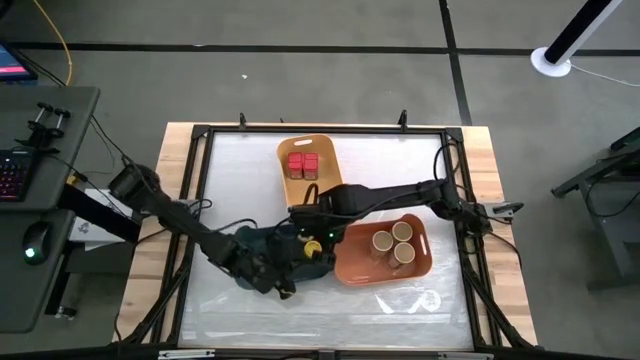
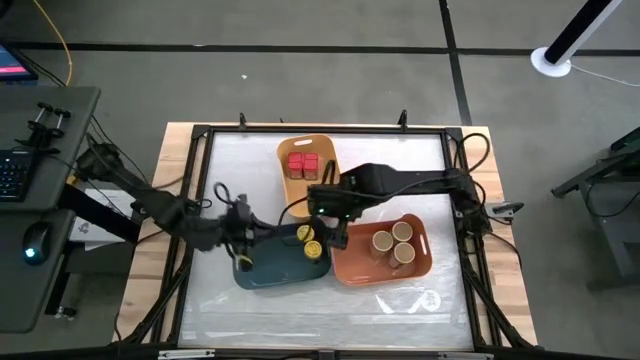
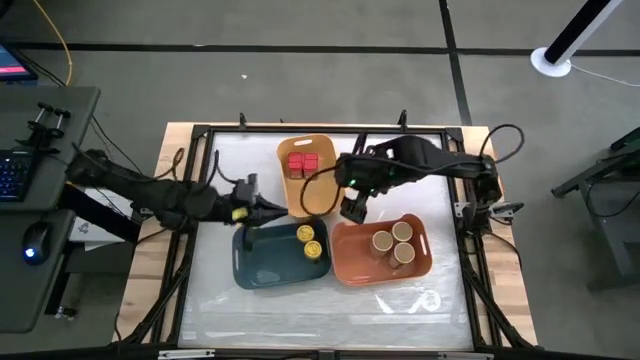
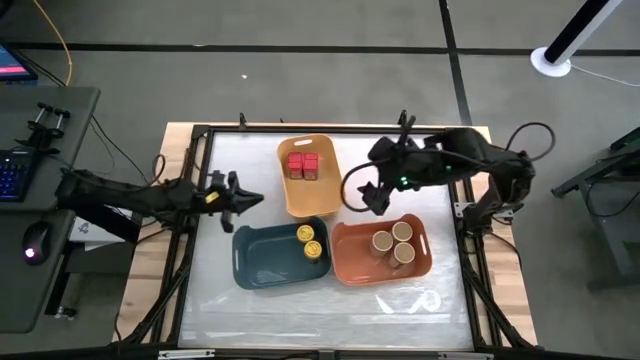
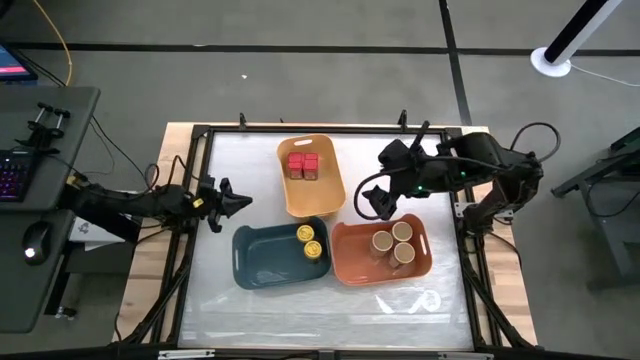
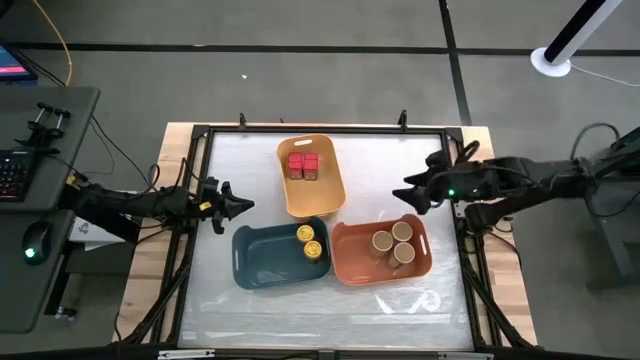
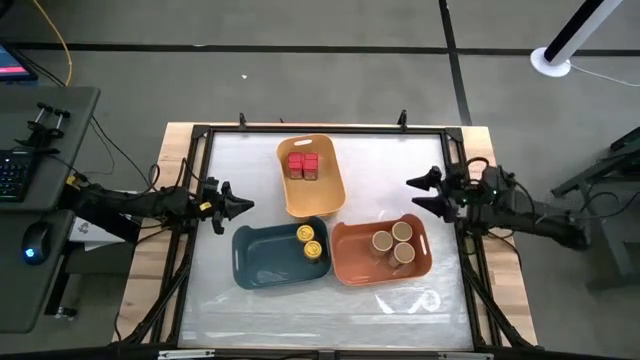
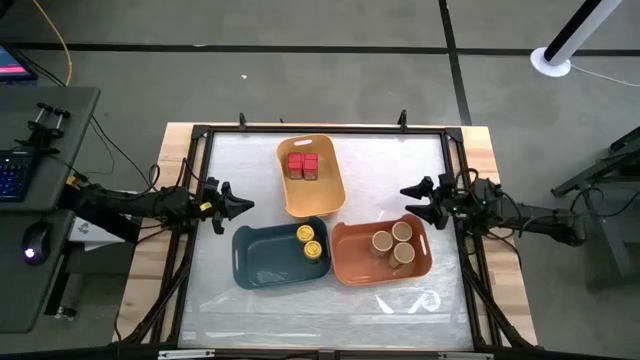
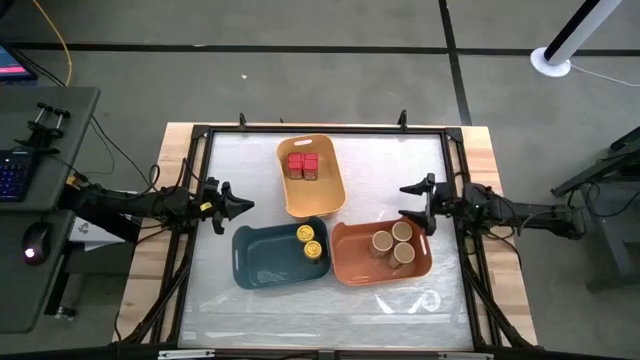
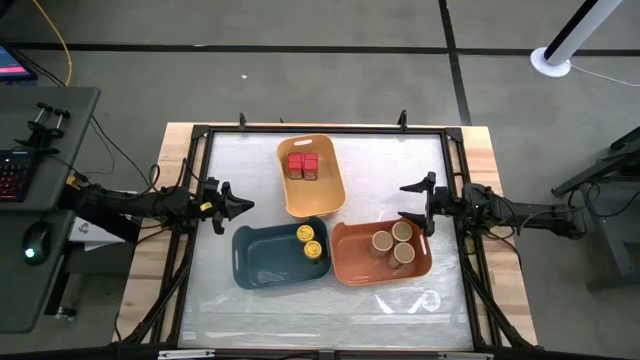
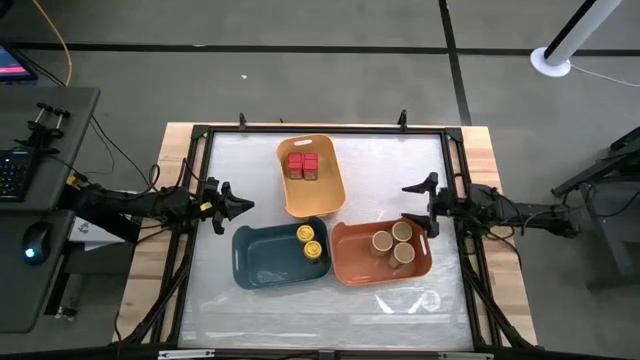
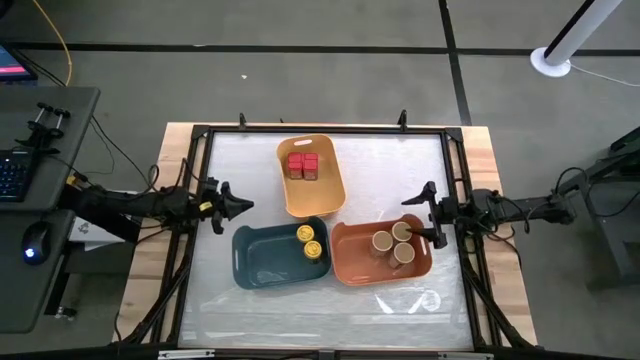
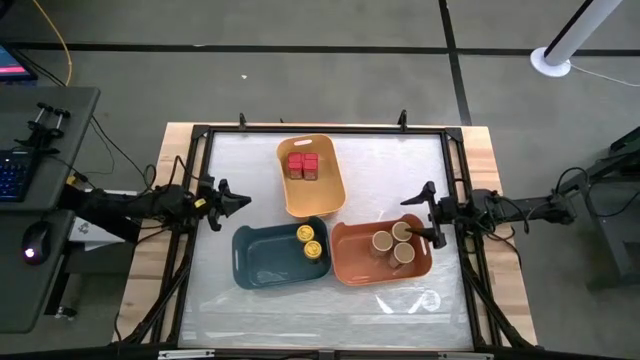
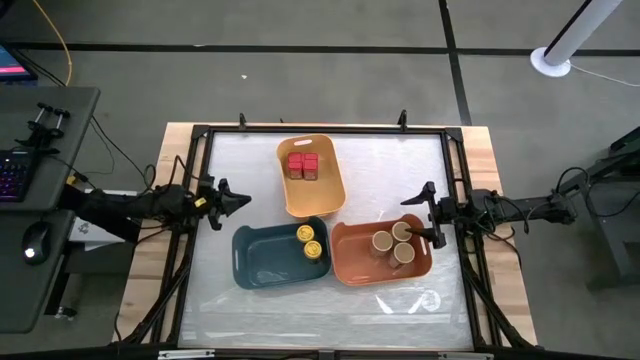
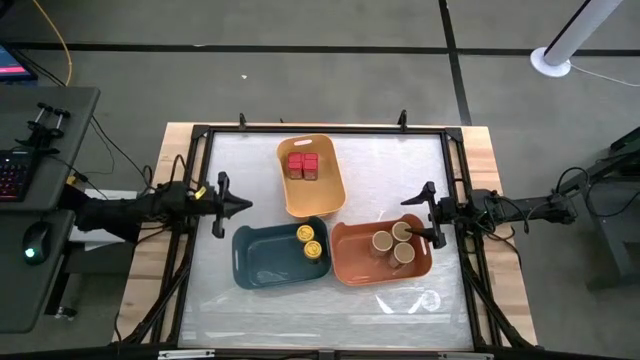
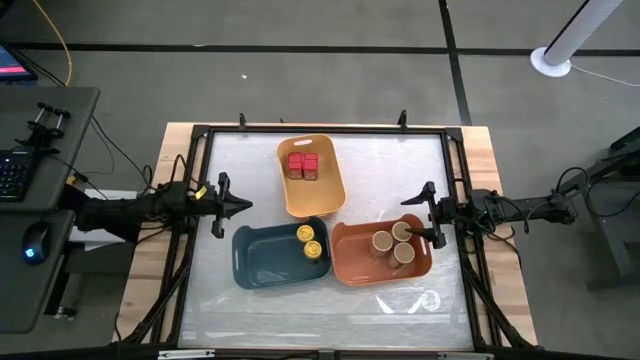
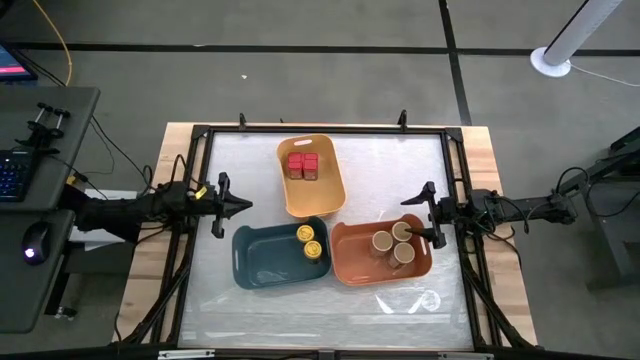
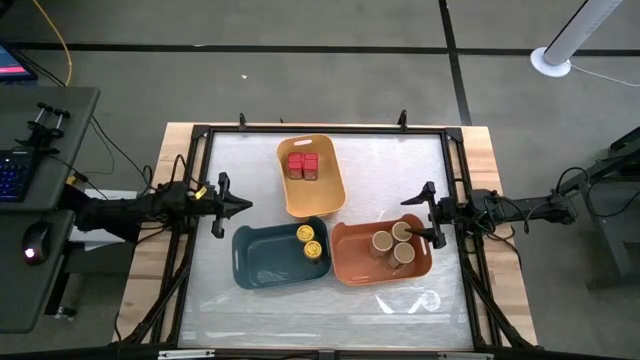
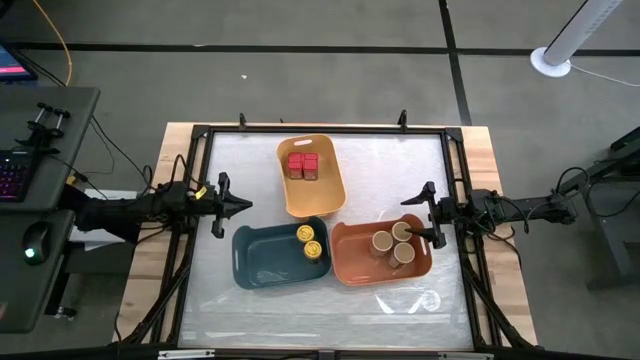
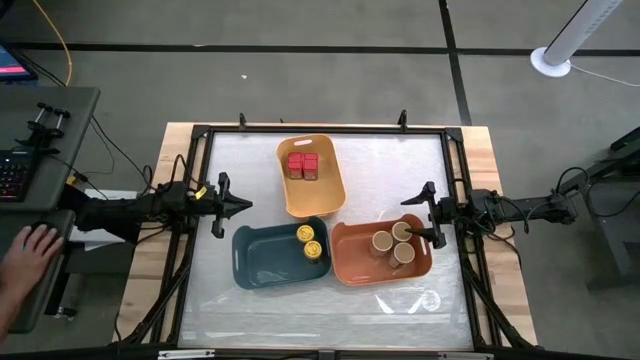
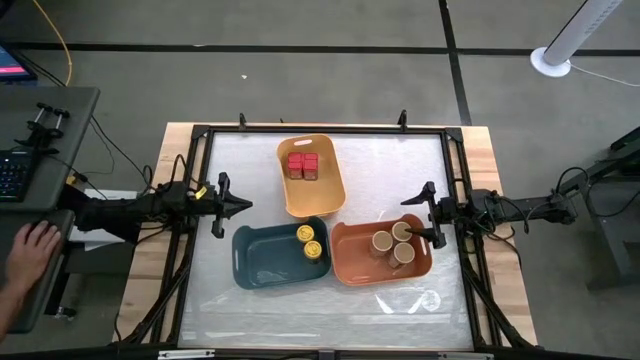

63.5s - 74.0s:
Task: Sort spices by type
Return to Home Position

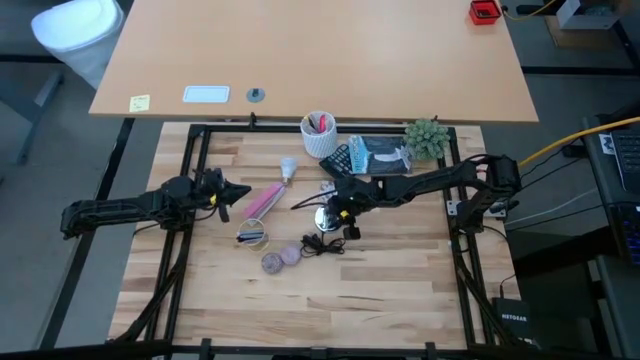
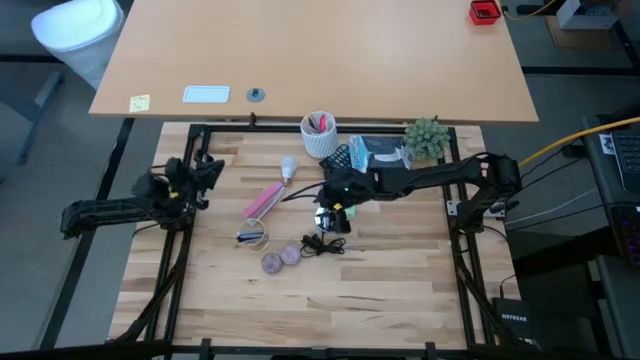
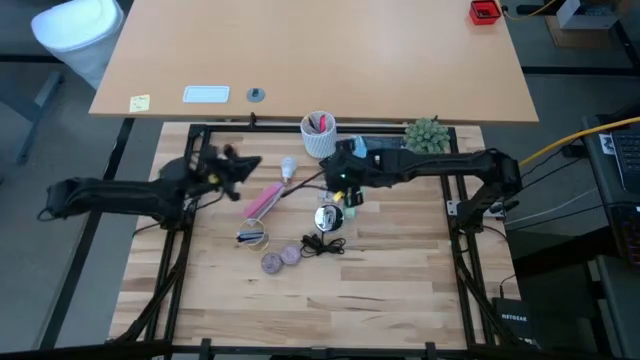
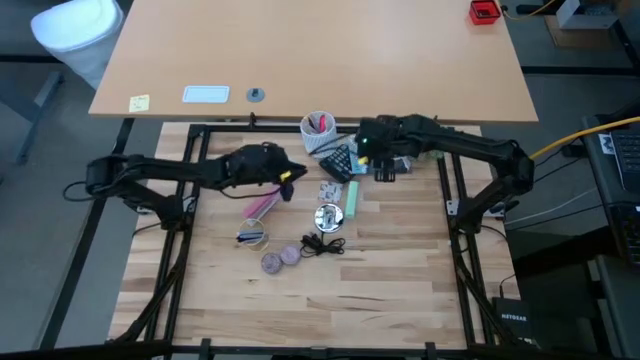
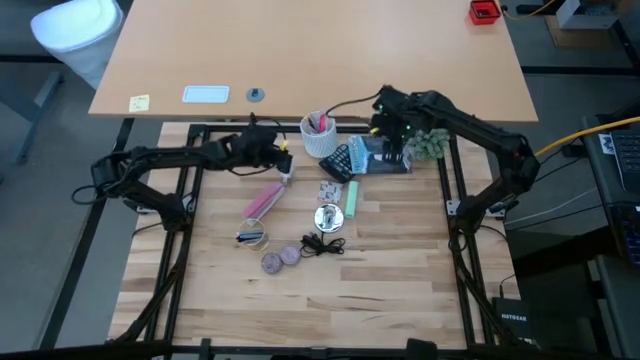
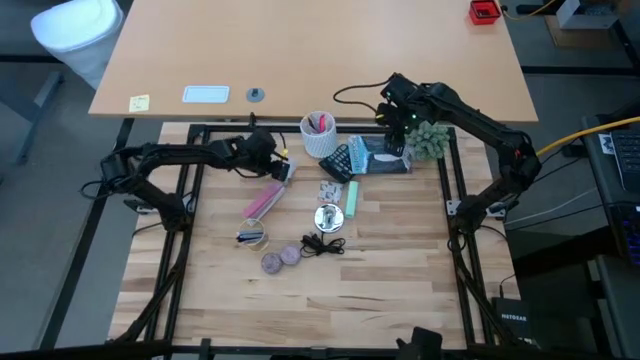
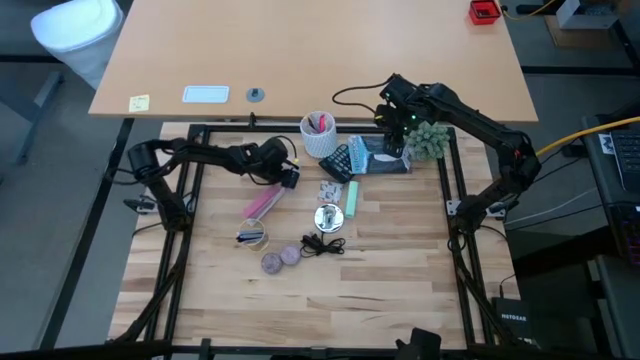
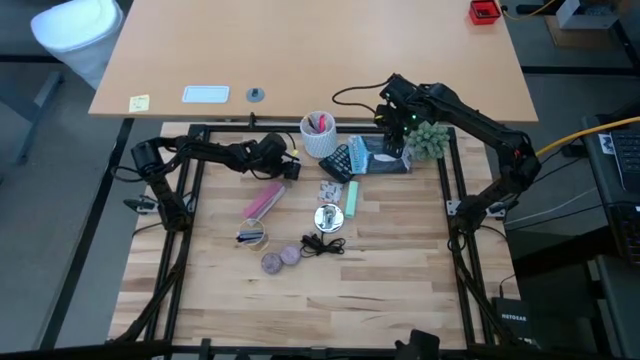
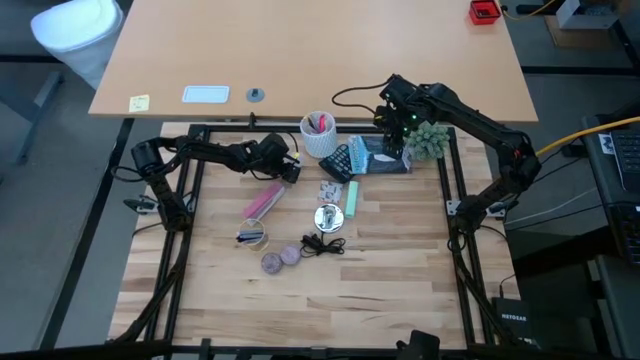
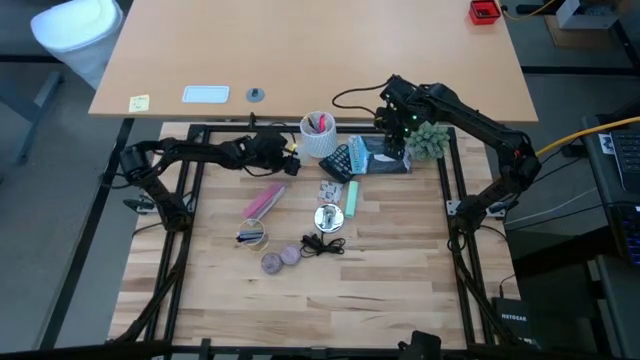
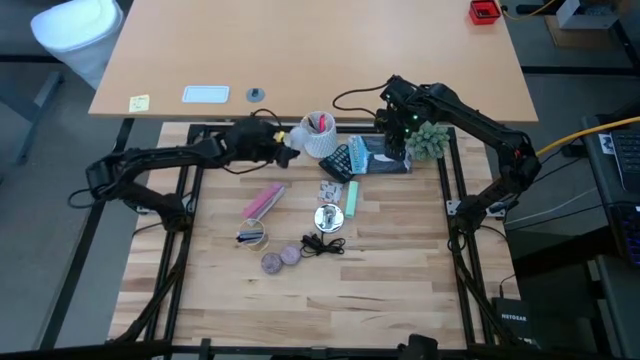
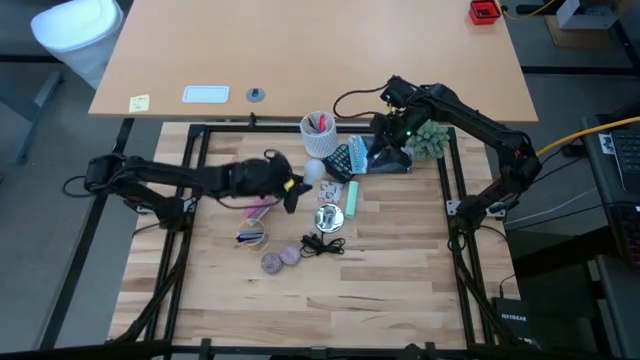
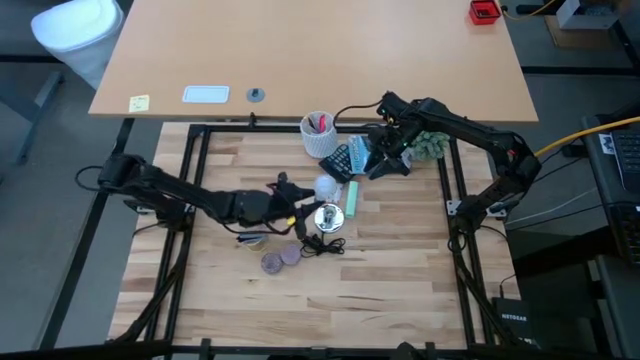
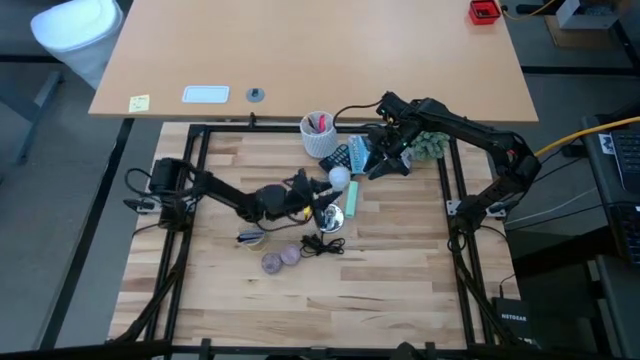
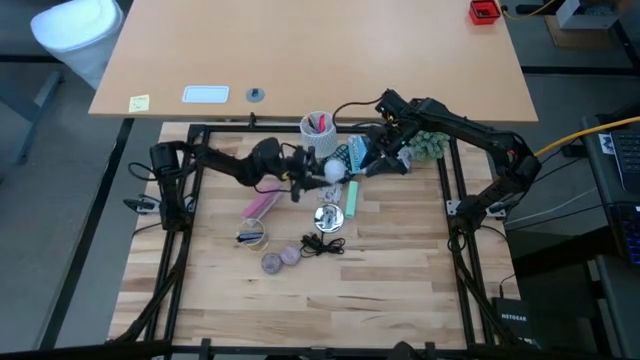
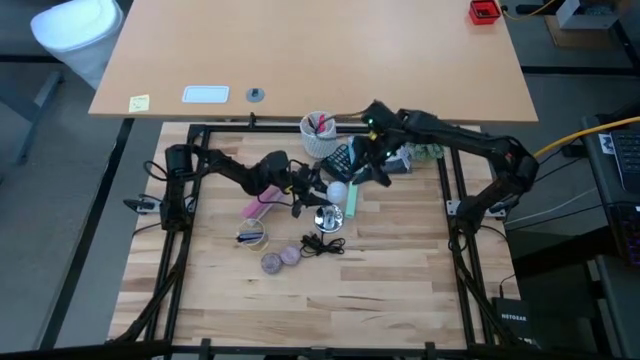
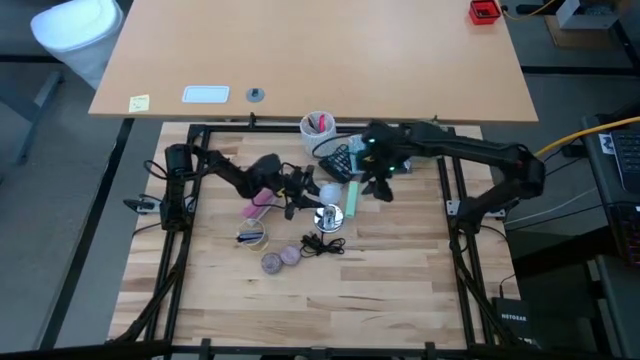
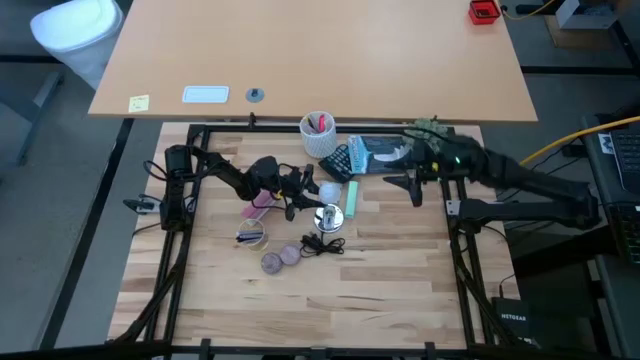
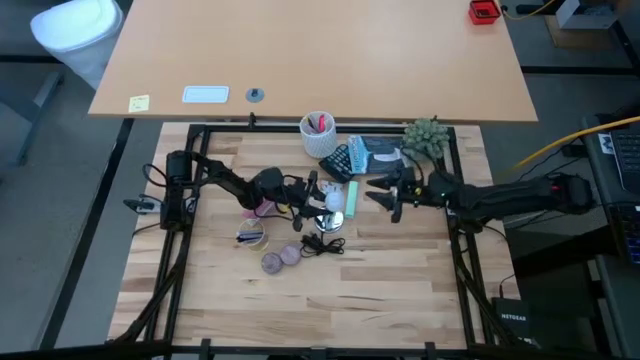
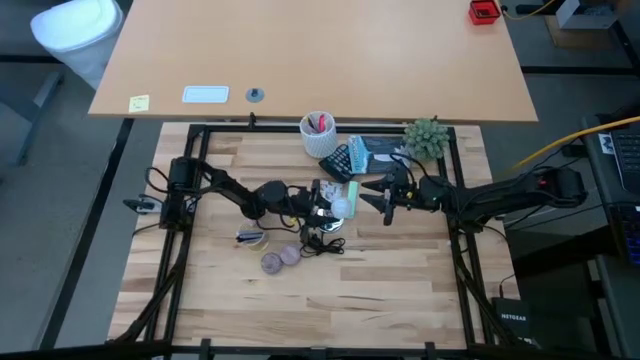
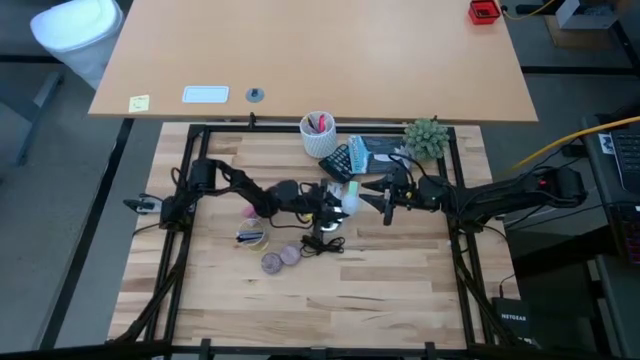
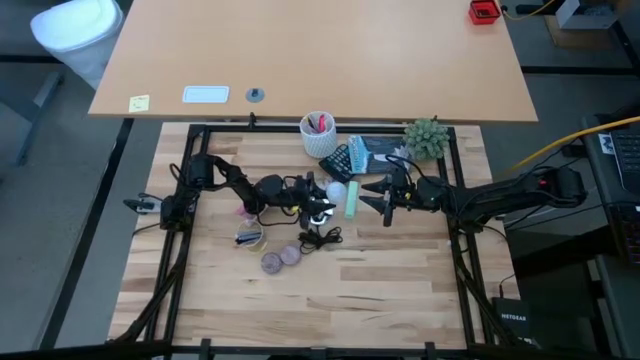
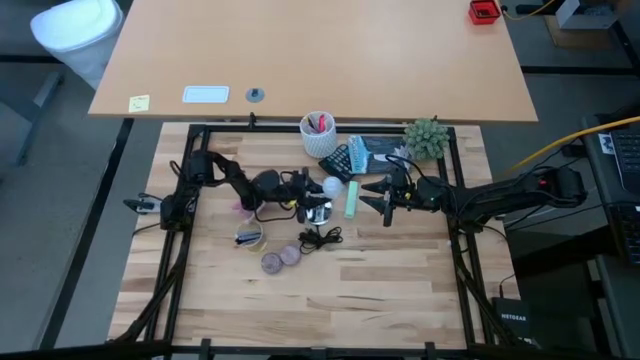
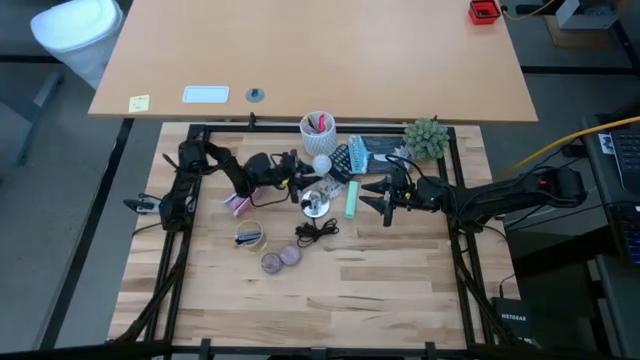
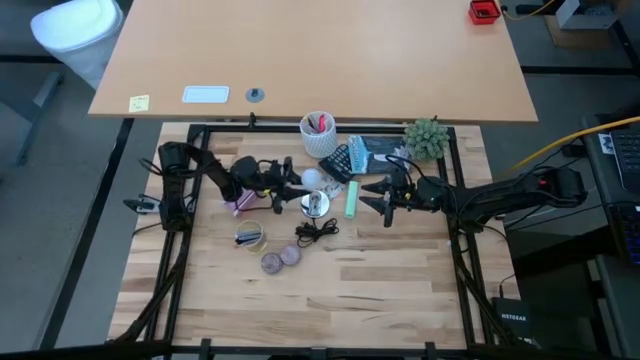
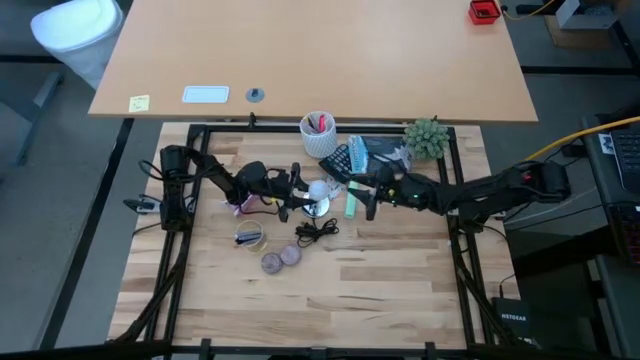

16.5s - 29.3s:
Task: Screw lightbulb
Insert the white lightbulb into the silver lamp
